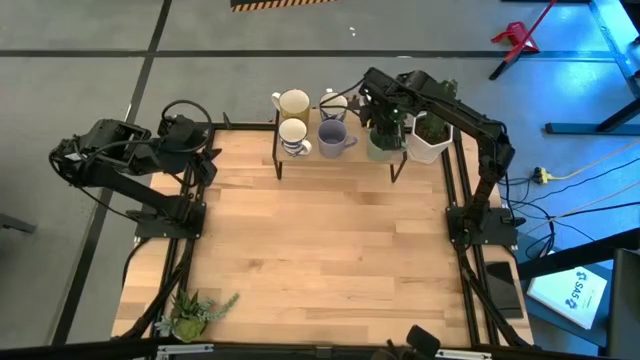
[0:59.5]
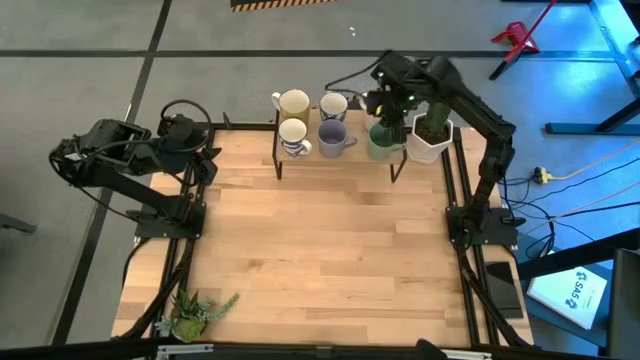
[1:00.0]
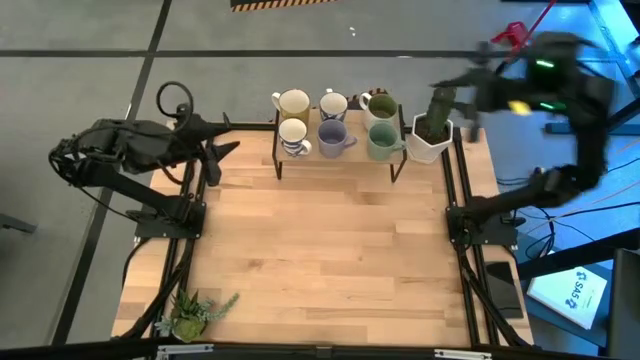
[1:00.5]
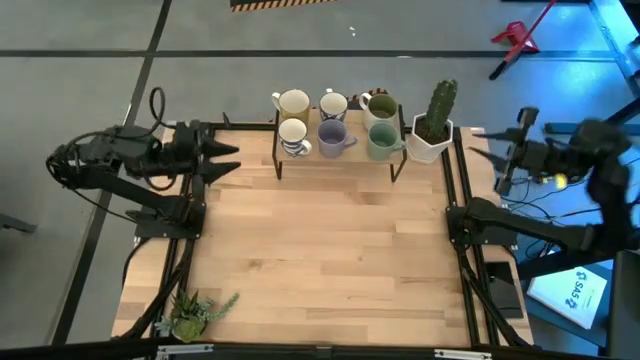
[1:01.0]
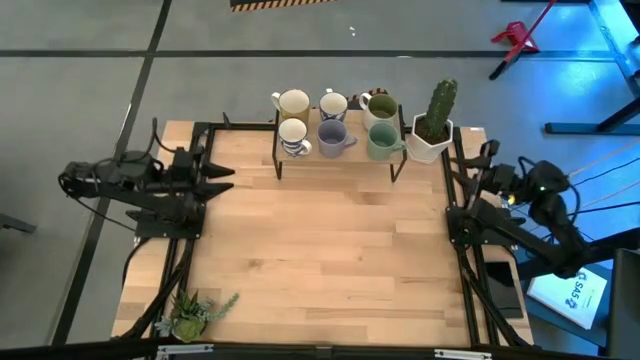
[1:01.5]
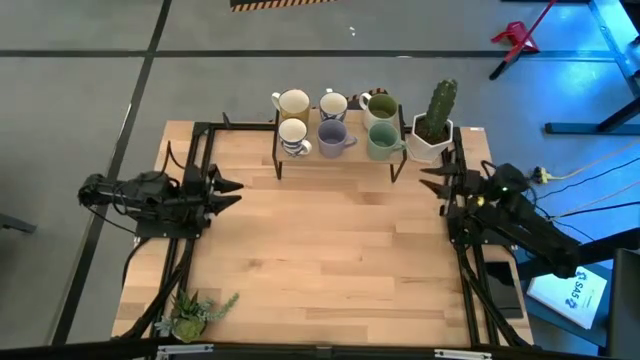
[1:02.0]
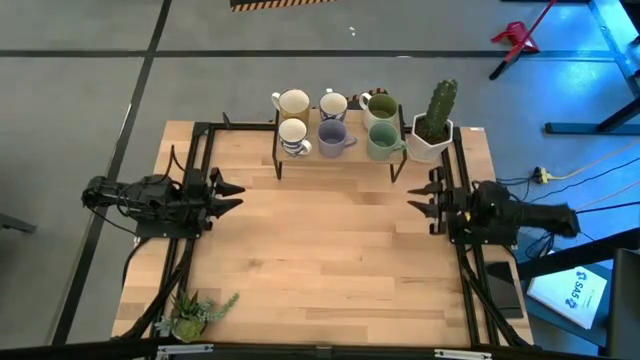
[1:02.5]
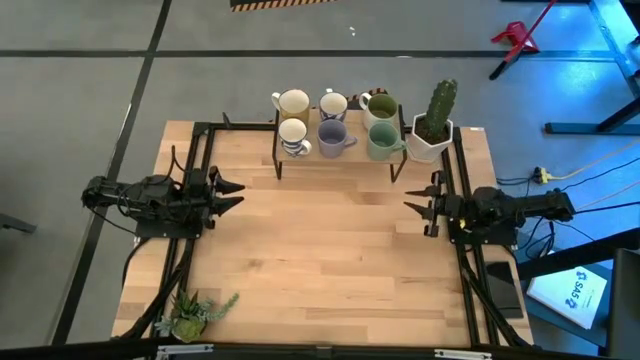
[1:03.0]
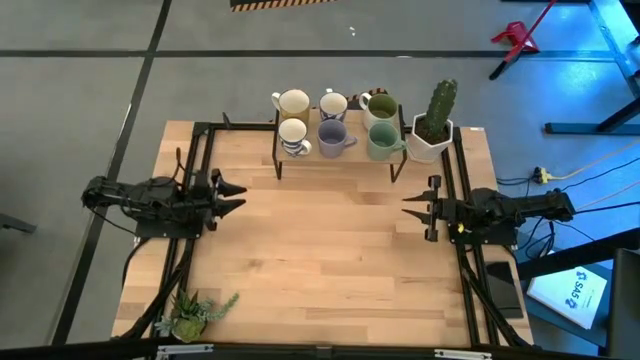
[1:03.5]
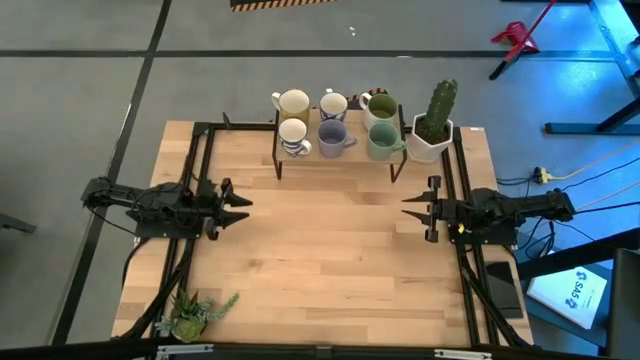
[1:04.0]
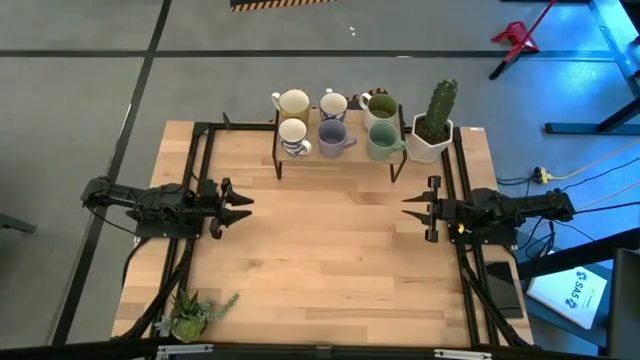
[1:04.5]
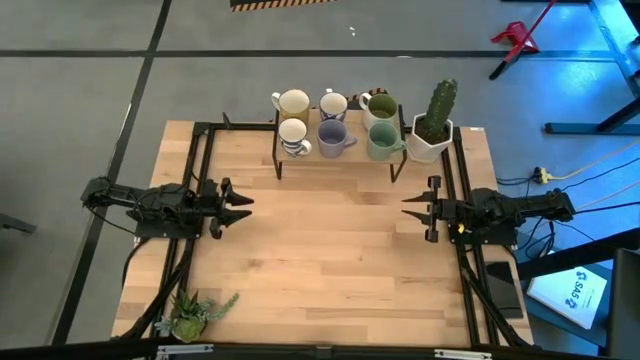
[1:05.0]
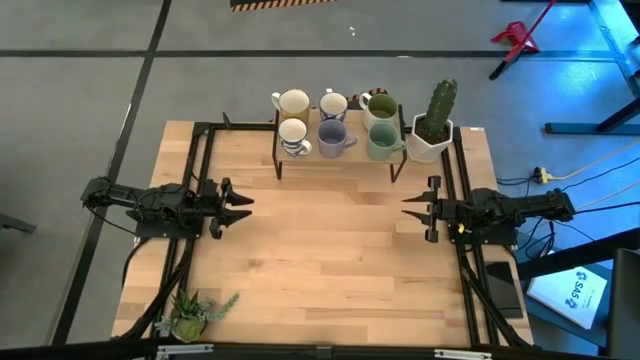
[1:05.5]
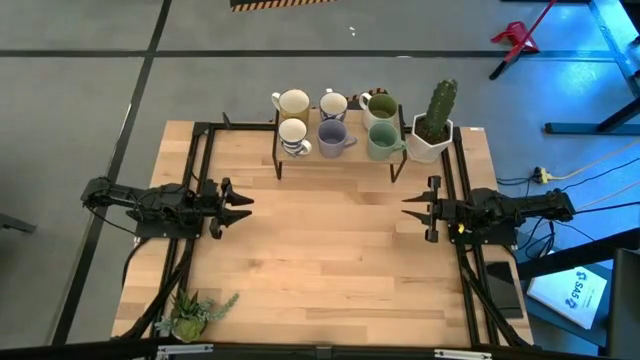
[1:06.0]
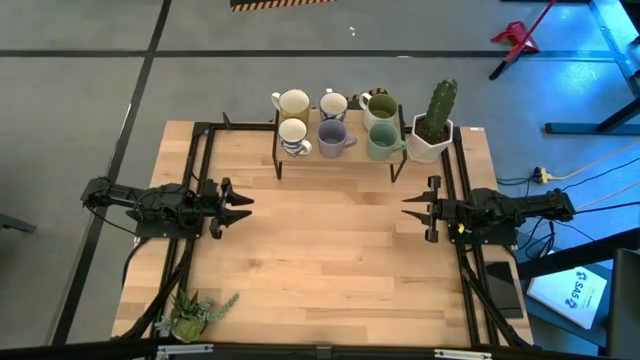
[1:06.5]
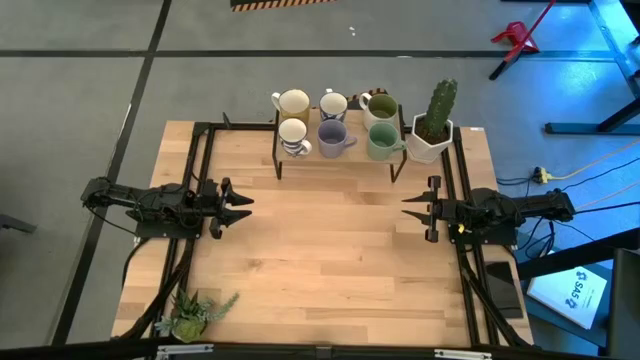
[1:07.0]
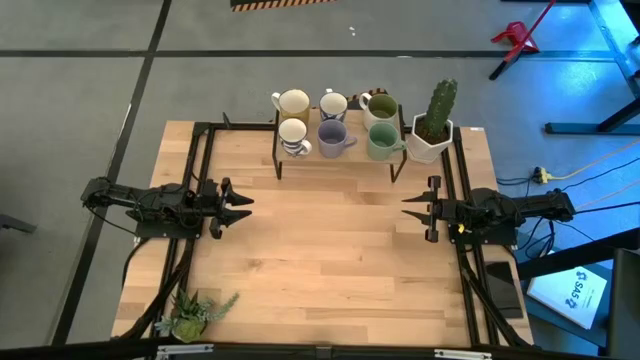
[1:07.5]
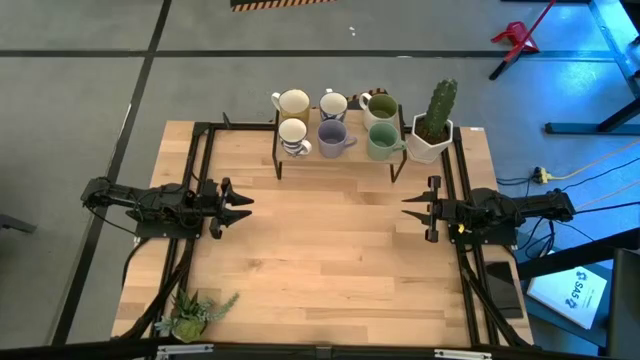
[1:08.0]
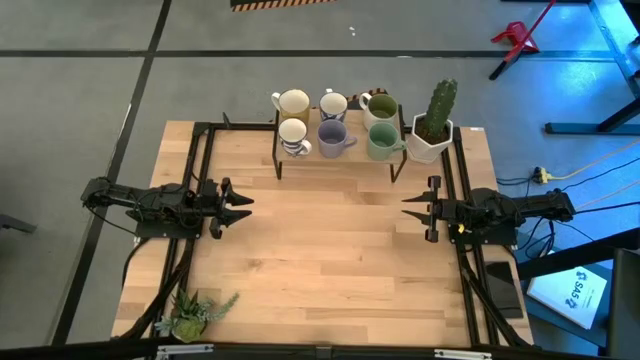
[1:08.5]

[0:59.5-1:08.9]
Task: Place coffee mugs
Return to Home Position

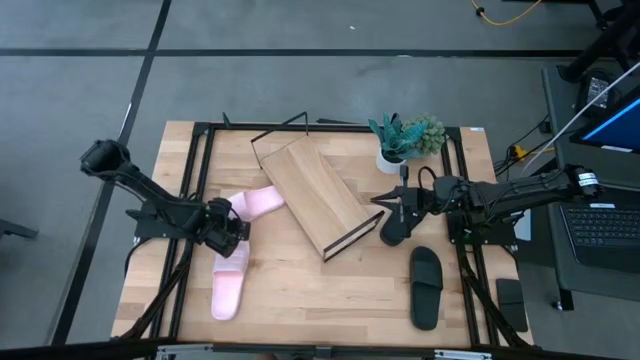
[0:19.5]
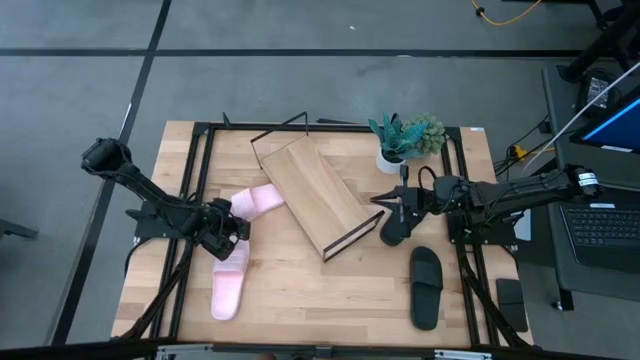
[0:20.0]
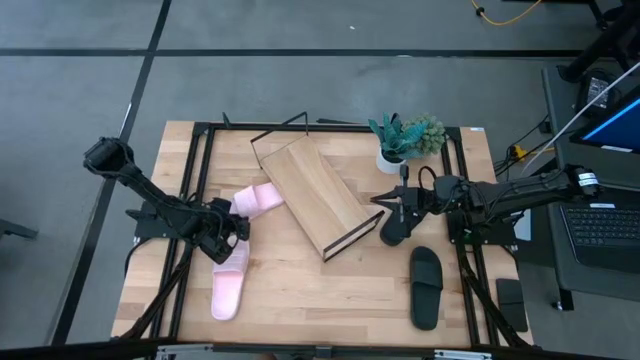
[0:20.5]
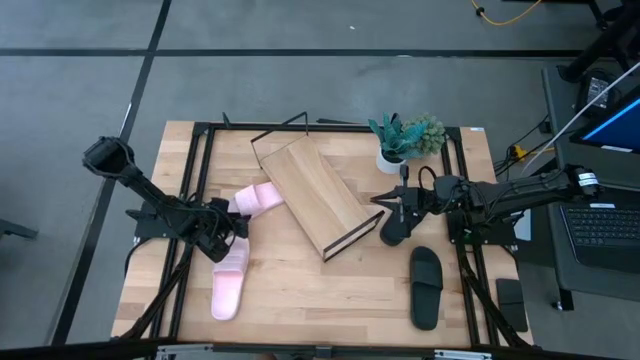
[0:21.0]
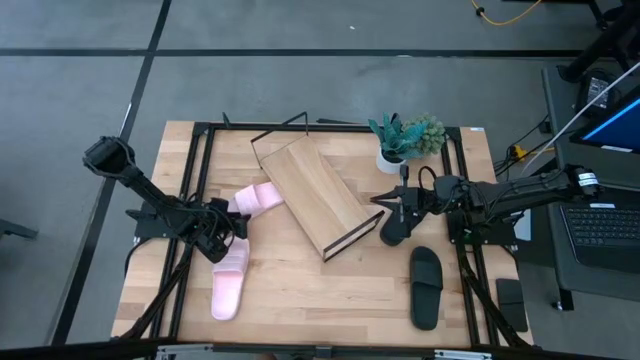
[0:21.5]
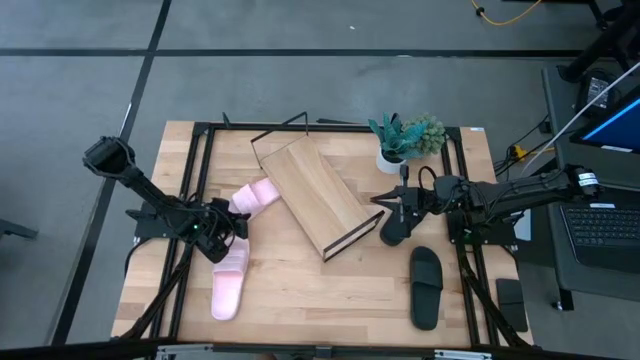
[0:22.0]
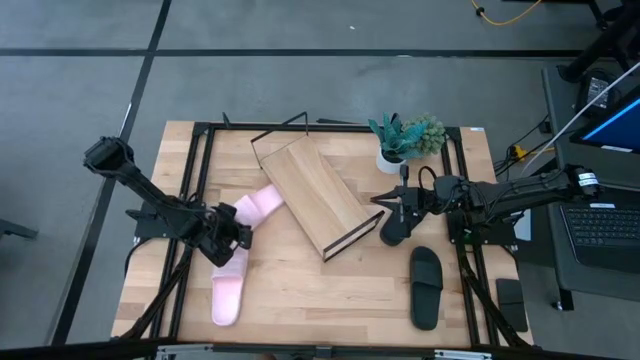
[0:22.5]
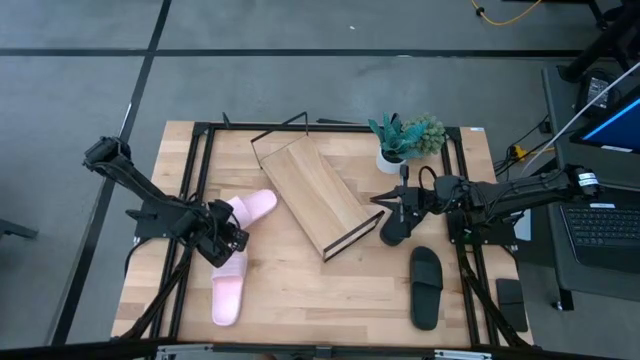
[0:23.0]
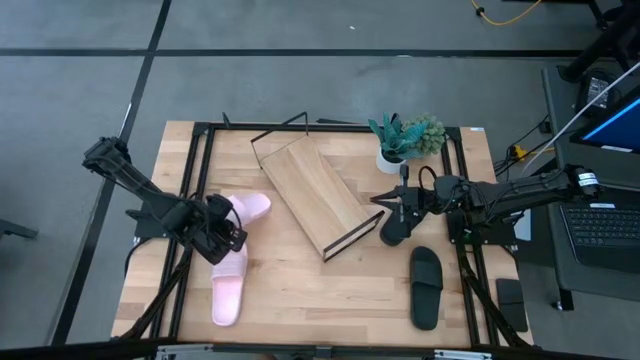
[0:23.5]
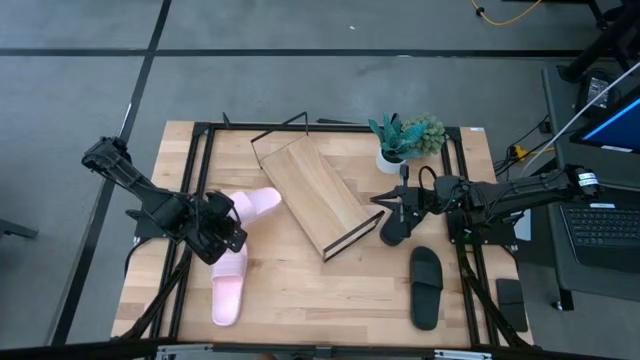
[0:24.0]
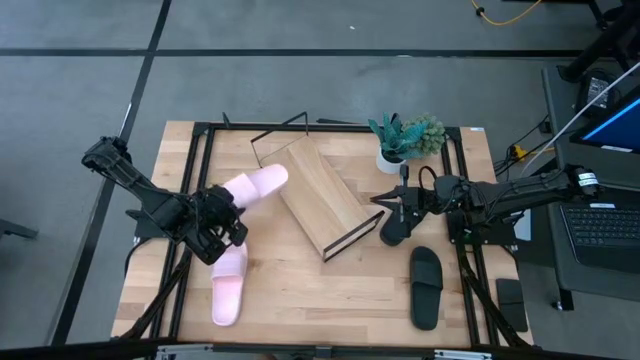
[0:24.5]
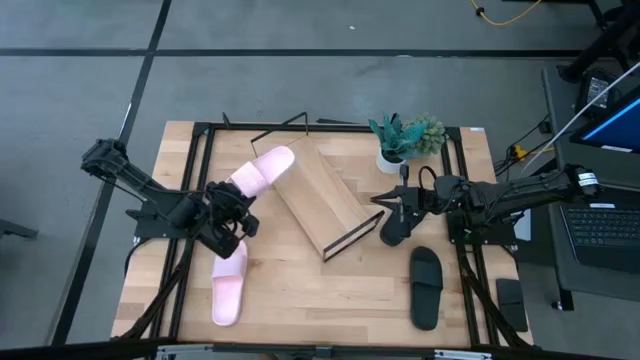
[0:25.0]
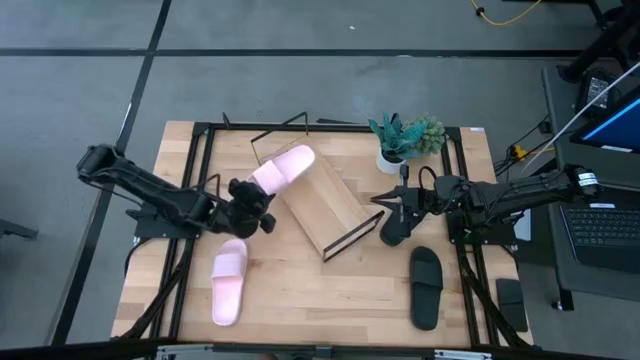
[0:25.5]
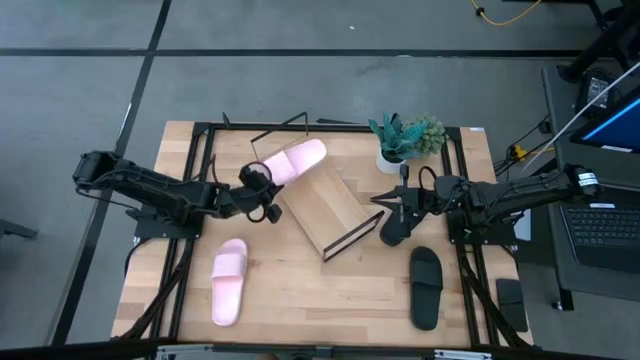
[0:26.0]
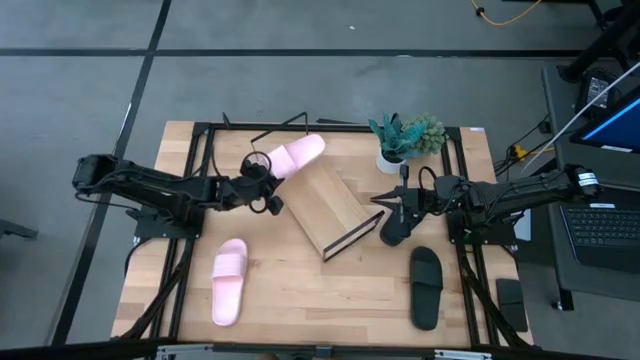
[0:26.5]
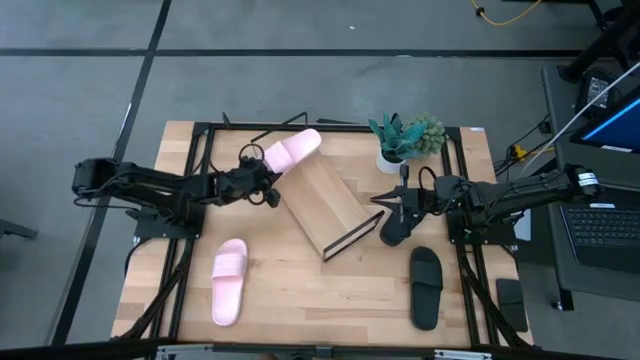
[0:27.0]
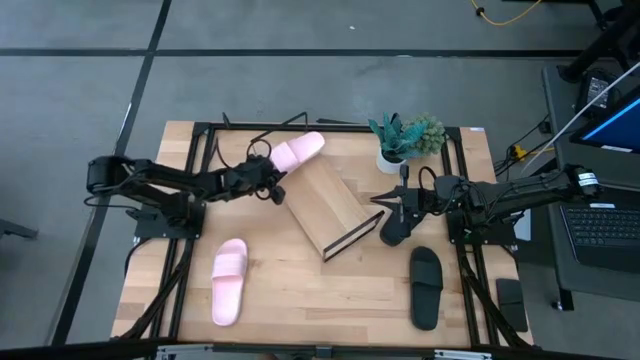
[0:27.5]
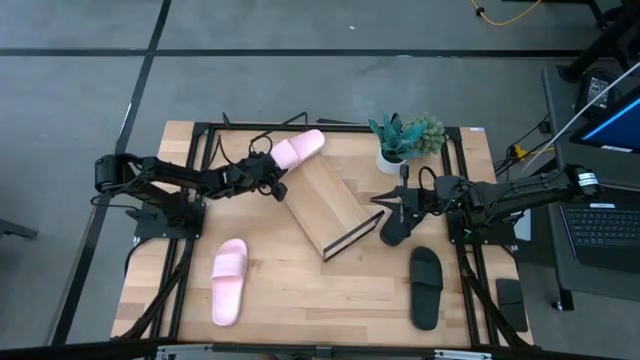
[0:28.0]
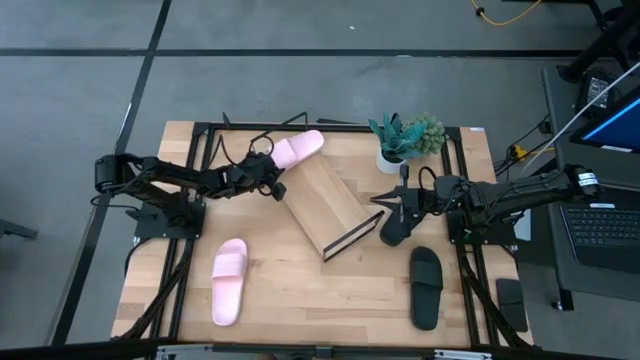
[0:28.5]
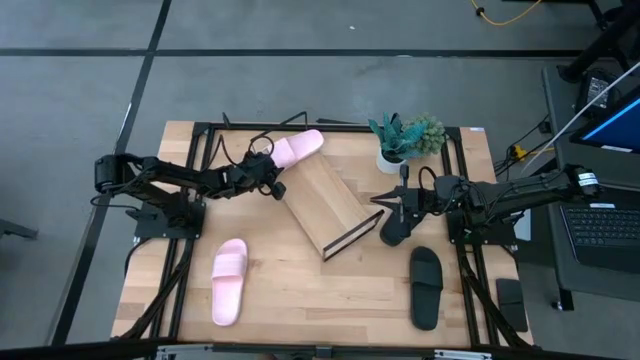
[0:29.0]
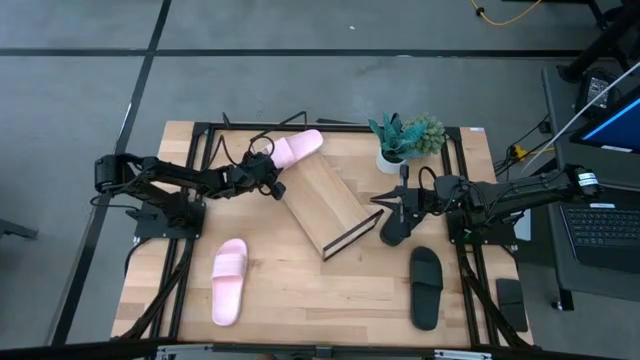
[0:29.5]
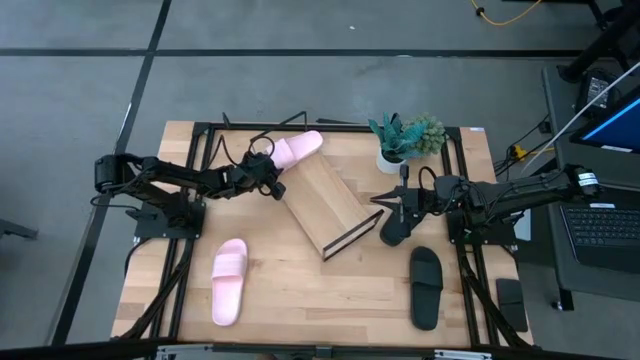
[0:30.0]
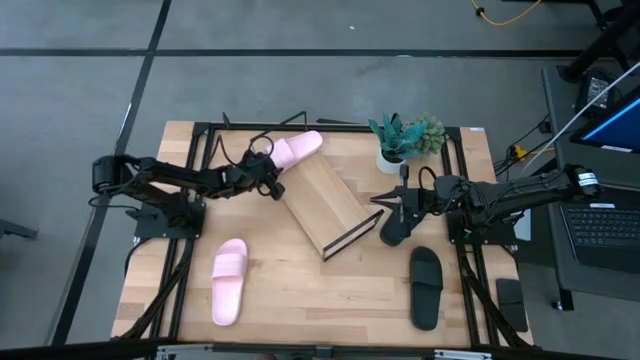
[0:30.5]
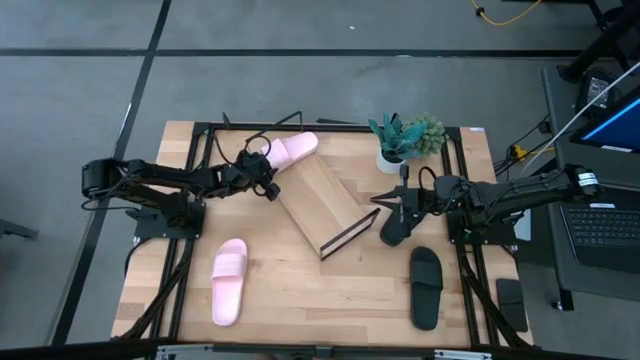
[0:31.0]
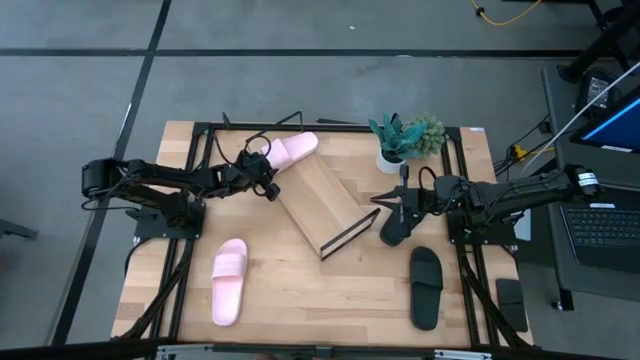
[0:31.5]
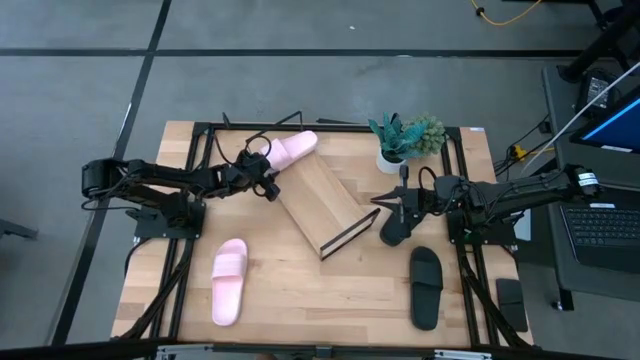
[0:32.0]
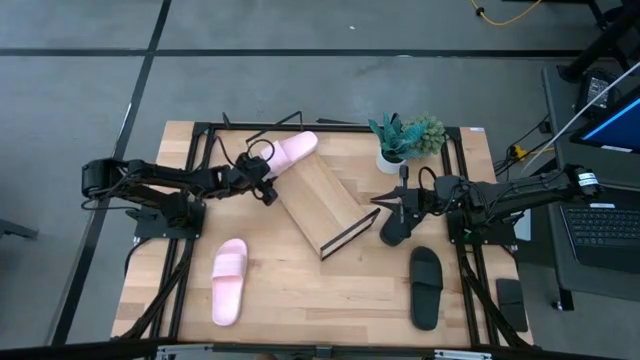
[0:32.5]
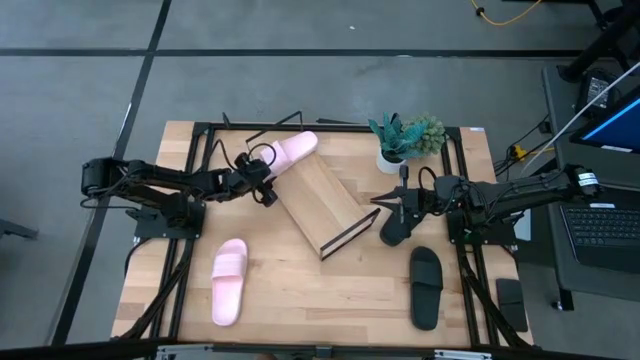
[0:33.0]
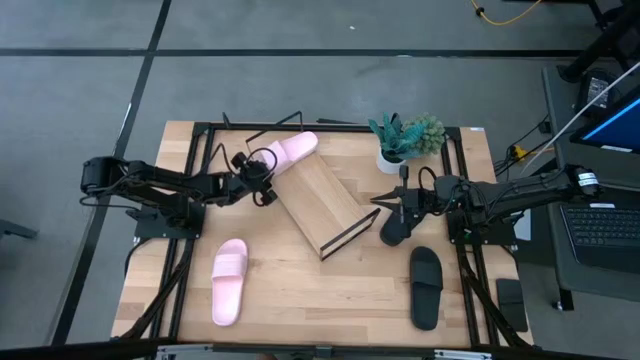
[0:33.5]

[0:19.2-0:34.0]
Task: Pick and place slides into the shelf
Put the top pink slide on the shelf
